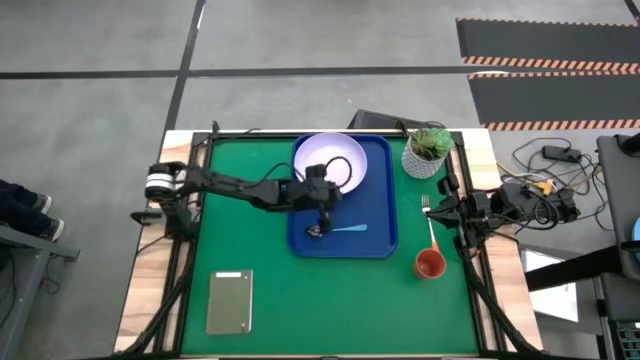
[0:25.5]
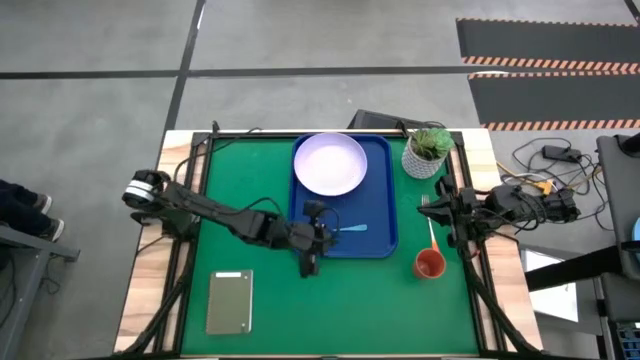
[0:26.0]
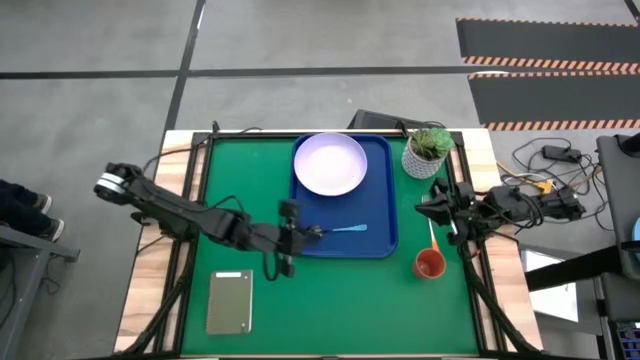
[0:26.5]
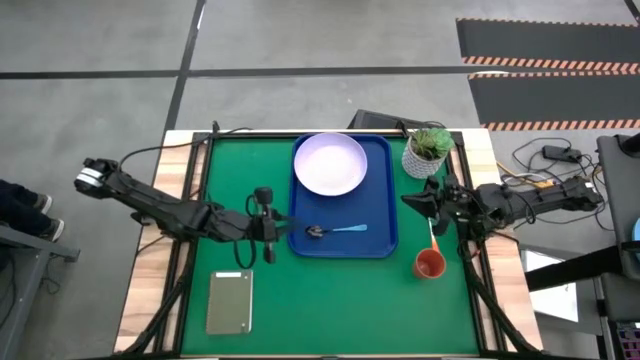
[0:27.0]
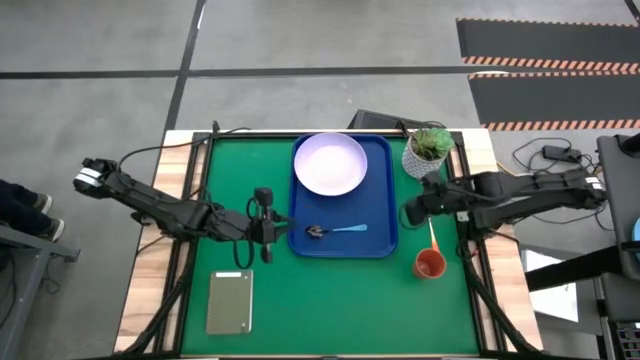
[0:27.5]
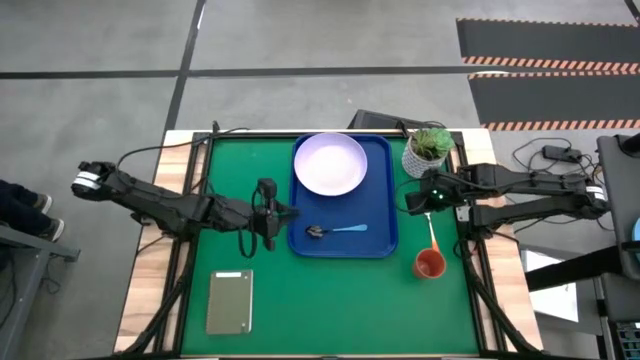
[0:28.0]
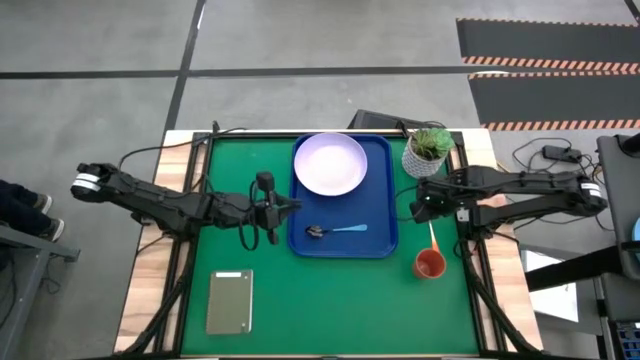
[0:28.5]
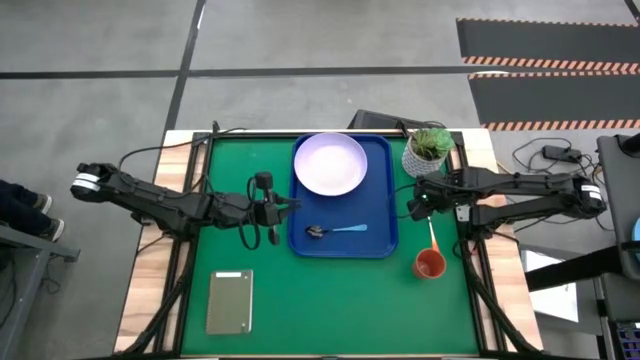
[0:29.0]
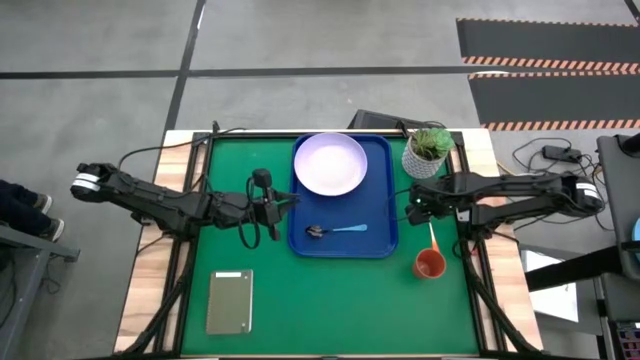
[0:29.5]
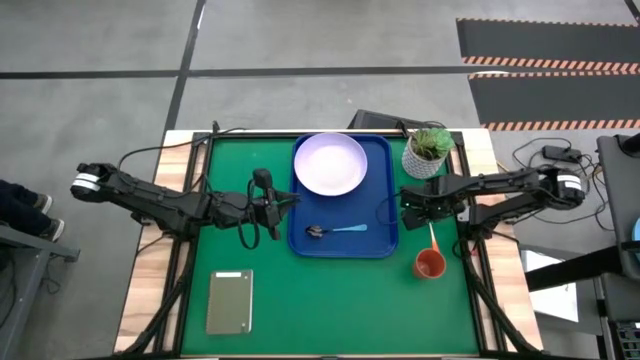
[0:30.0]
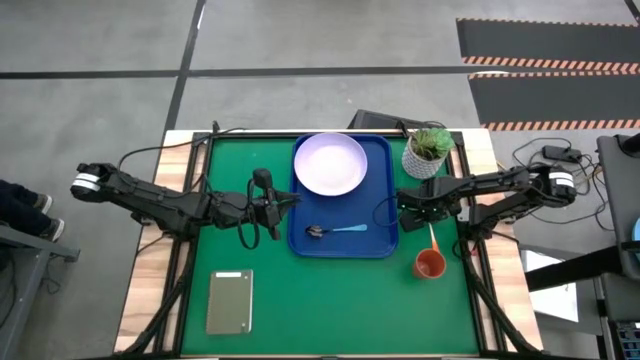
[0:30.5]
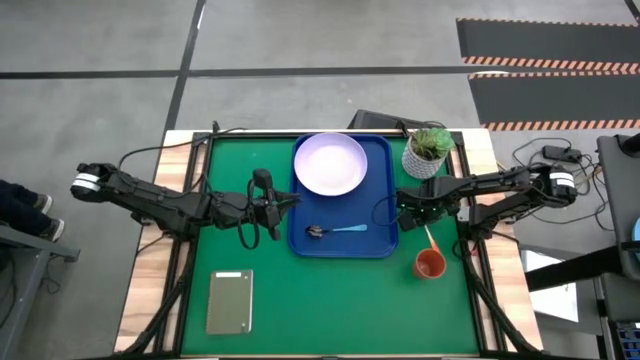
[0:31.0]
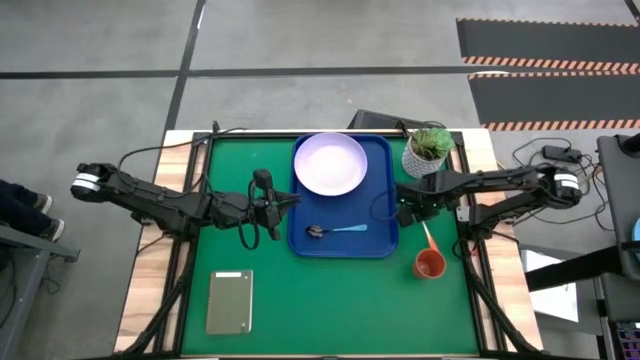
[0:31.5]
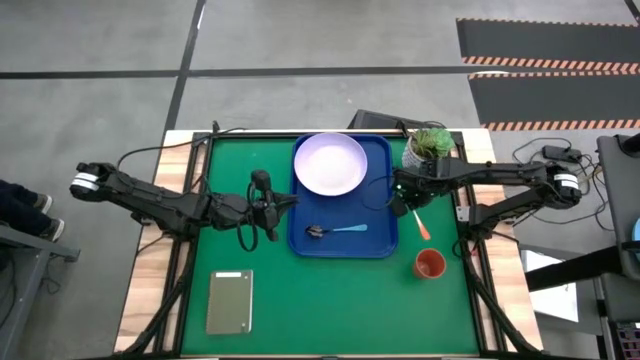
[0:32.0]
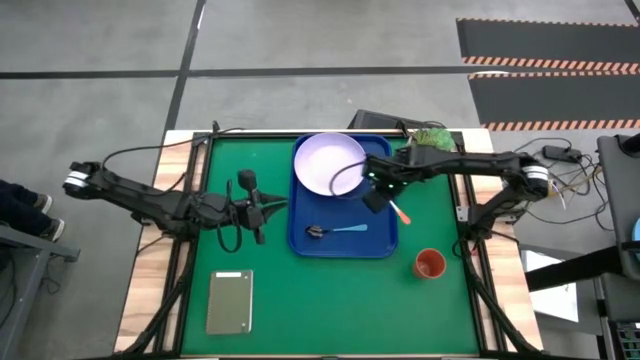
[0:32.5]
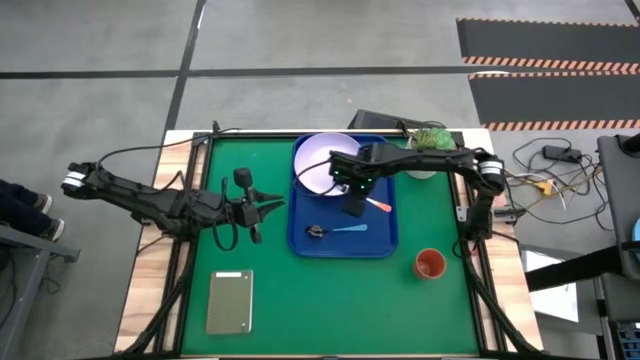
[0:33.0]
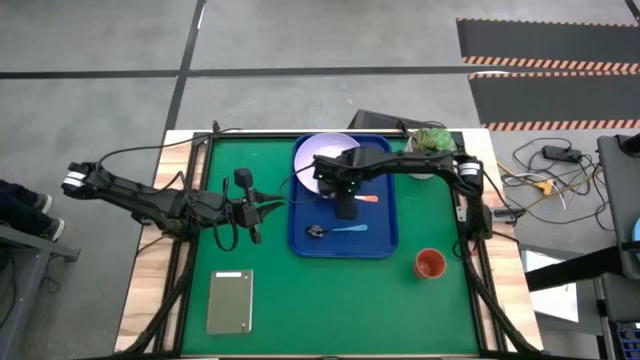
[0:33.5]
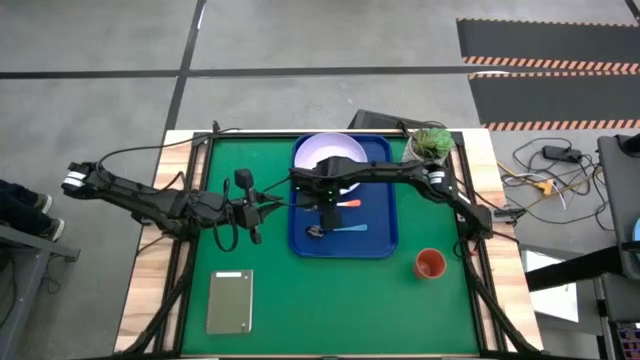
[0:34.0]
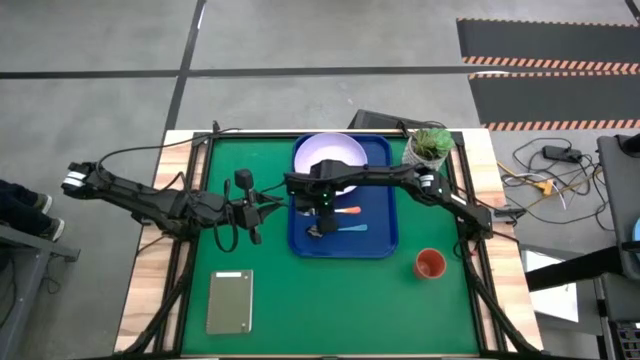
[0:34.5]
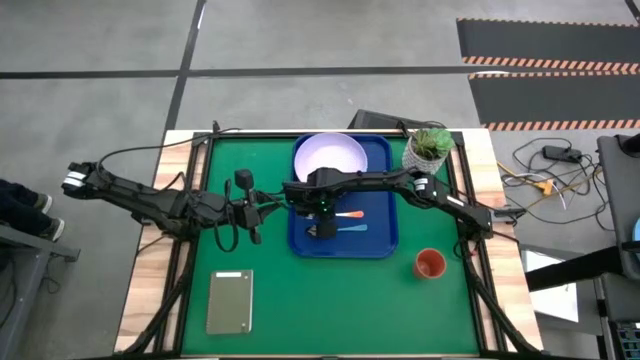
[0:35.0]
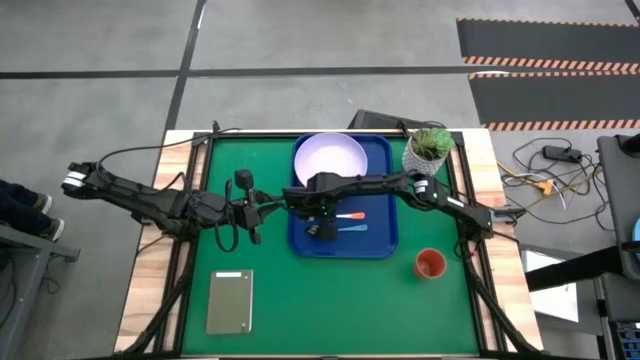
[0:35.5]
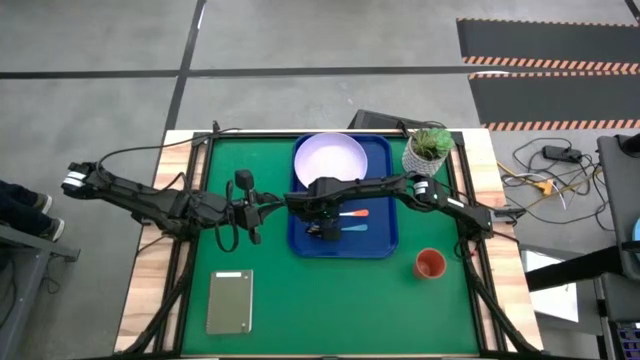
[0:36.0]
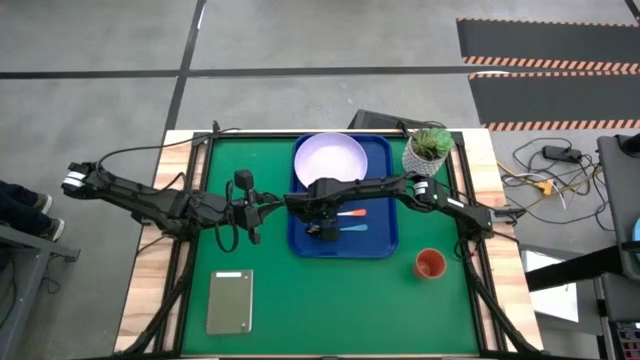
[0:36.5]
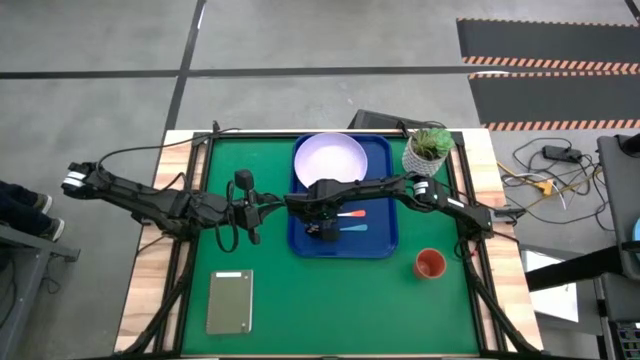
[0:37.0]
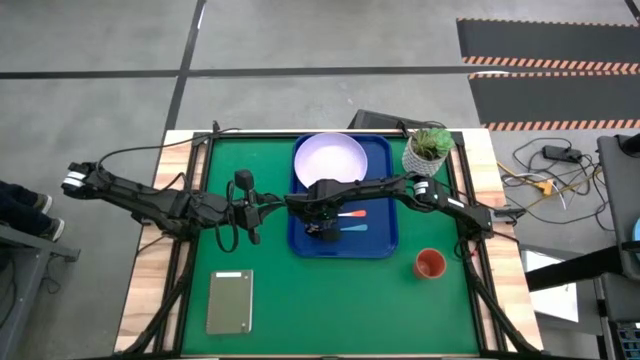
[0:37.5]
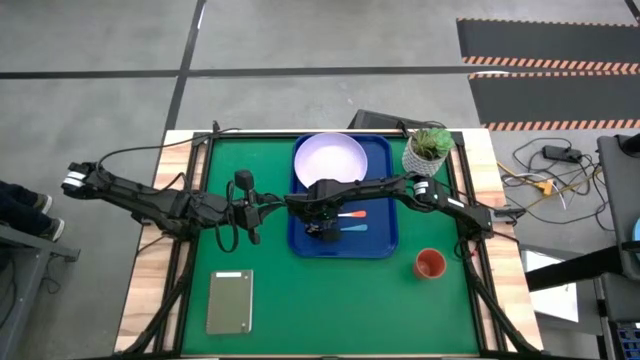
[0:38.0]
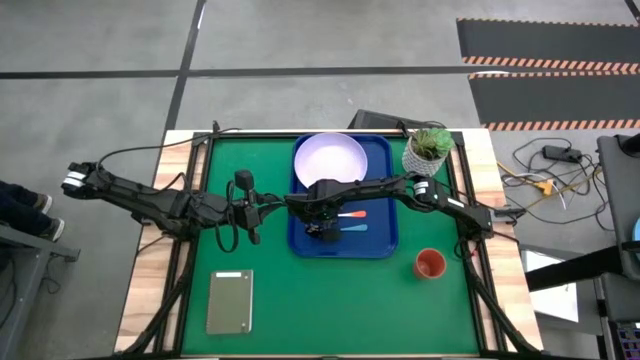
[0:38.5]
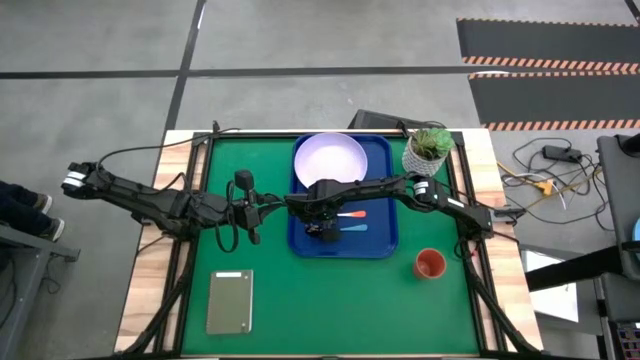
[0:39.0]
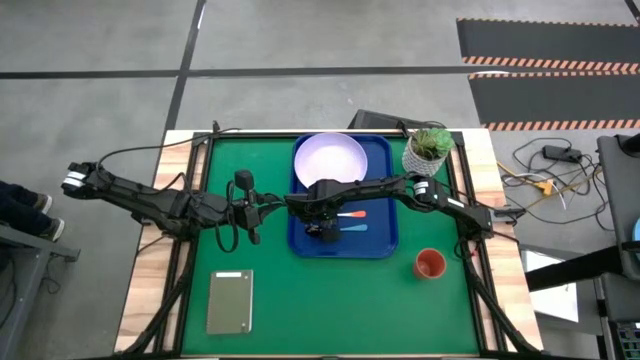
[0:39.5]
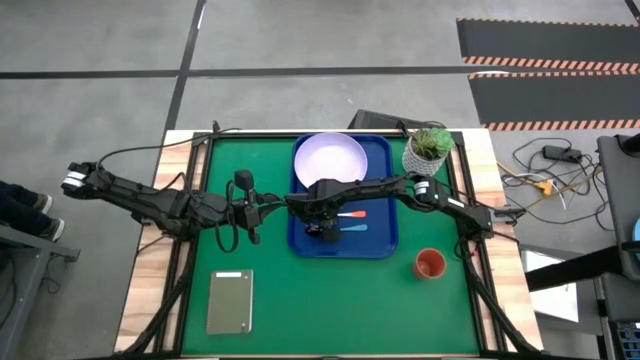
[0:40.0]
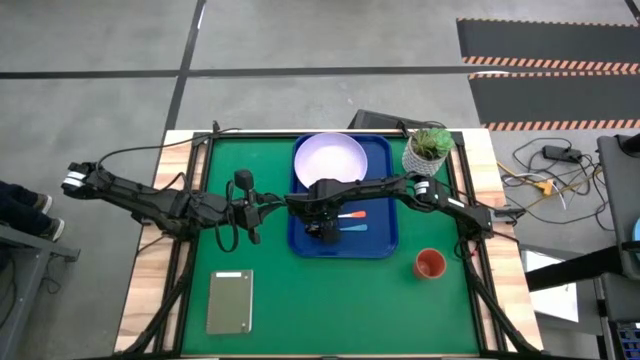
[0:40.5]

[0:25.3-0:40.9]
Task: Pick and place plate/cup/fork/spoon on tray
Put the orange fork on the blue serving tray to the top of the green spoon

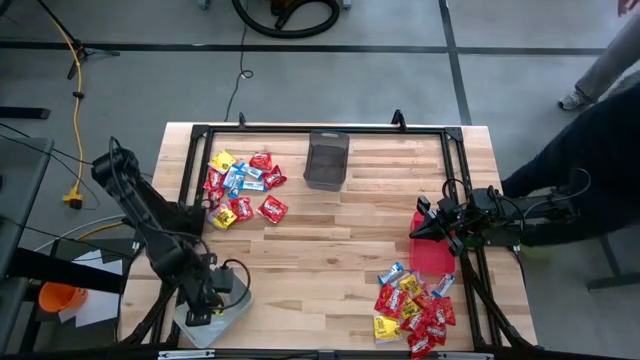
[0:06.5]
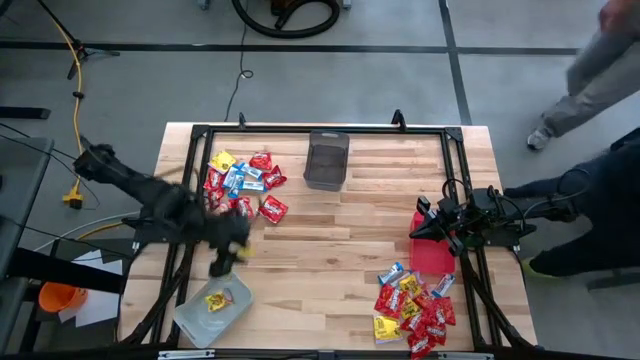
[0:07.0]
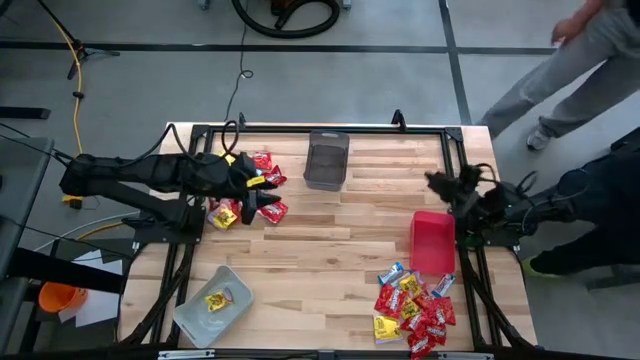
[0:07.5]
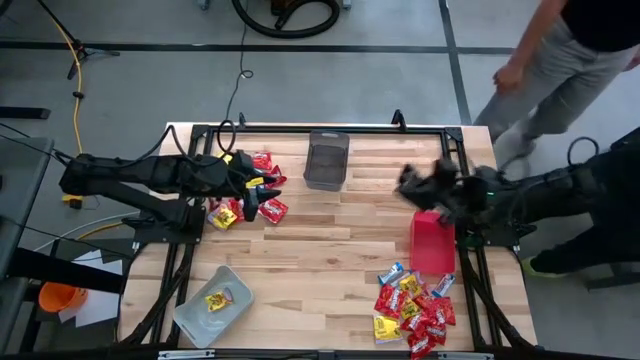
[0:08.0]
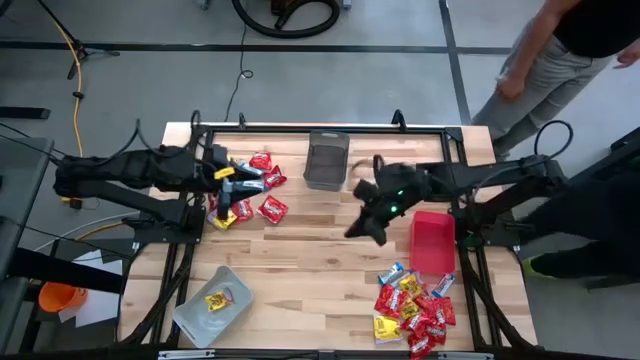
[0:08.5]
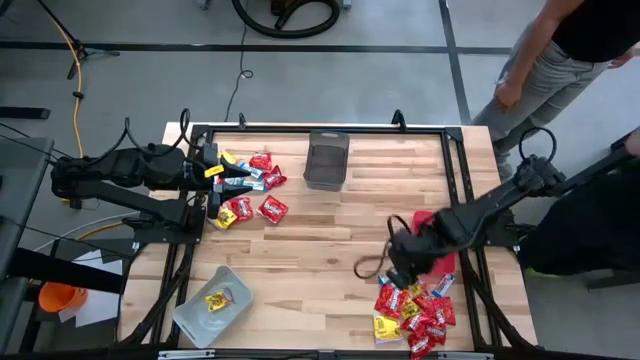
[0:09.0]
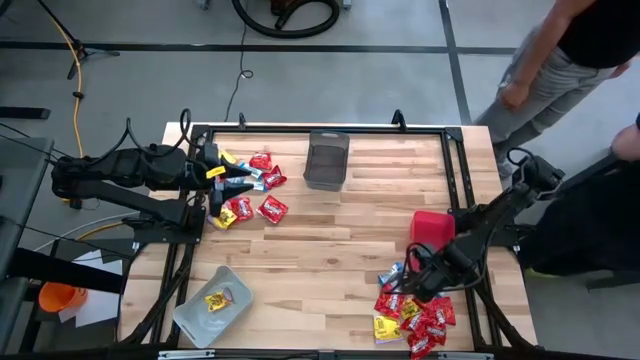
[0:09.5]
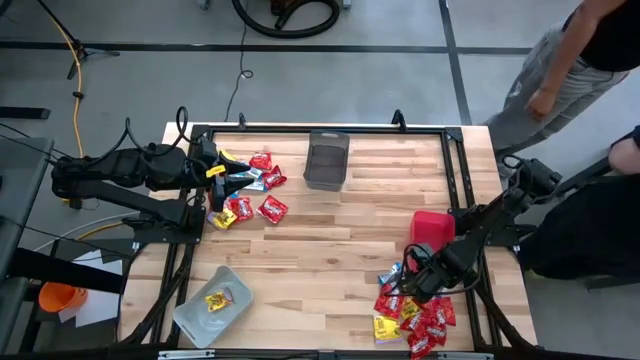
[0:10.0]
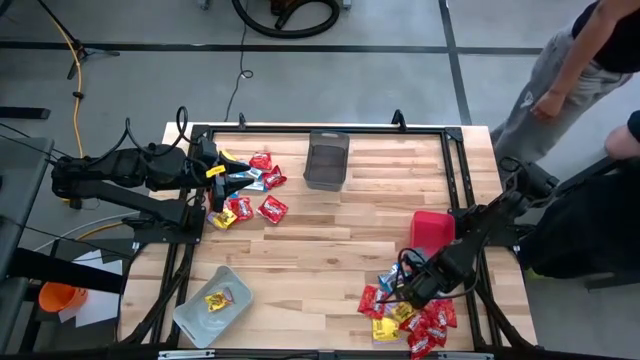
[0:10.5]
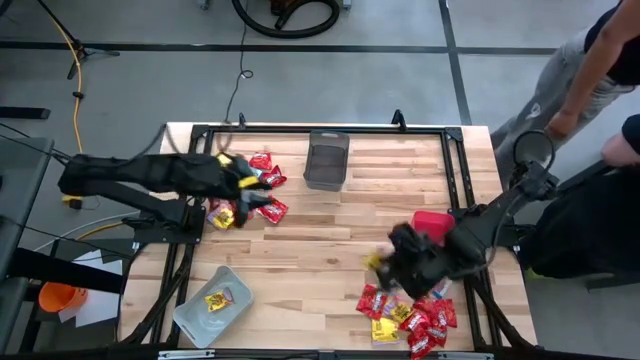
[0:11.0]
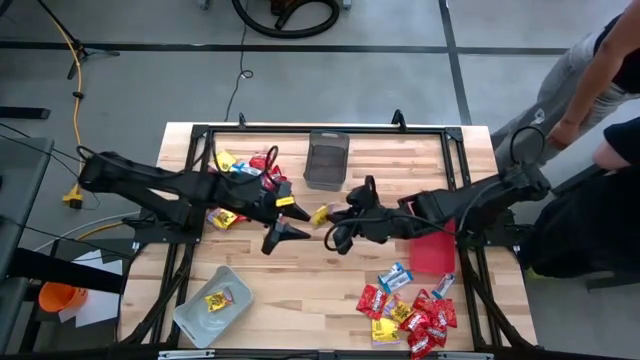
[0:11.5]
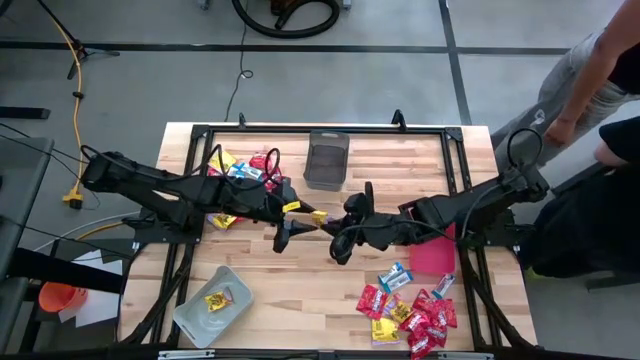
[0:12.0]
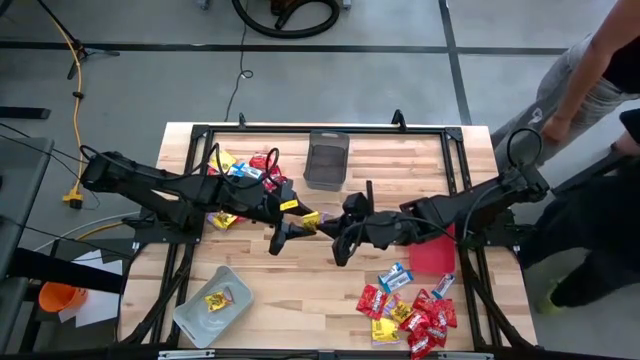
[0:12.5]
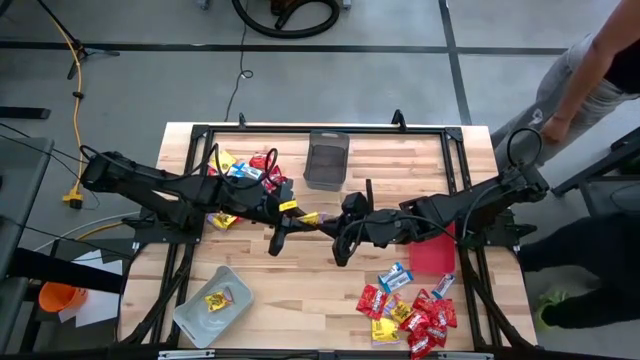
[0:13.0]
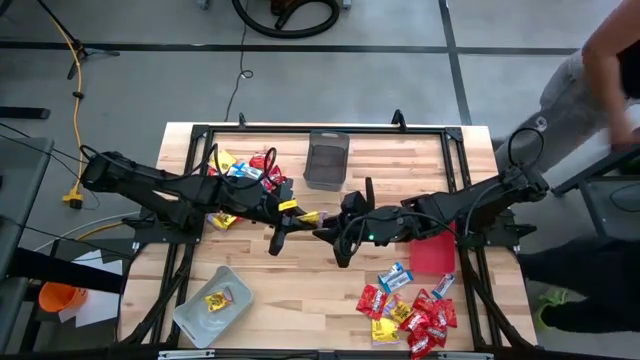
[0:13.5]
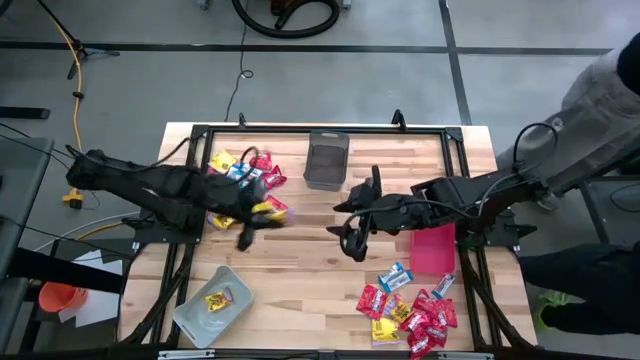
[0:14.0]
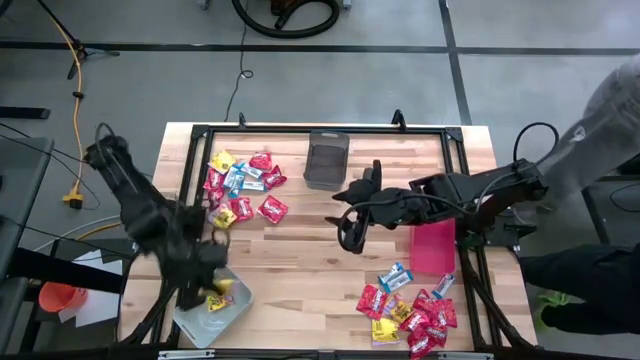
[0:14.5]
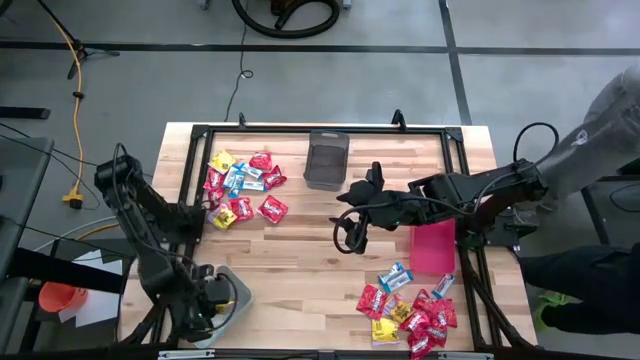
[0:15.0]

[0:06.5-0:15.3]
Task: Sort candy
Put the yellow candy pack into the gray bin
